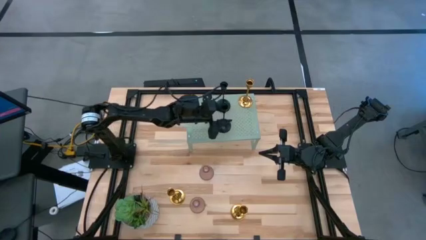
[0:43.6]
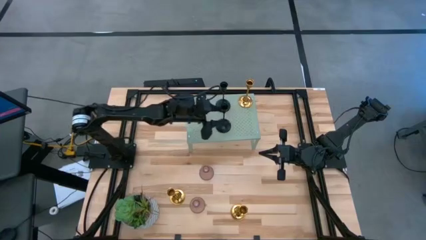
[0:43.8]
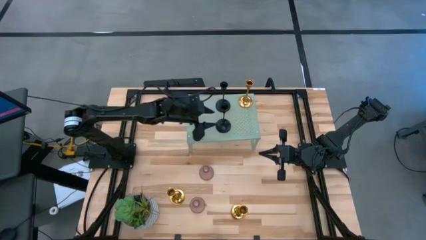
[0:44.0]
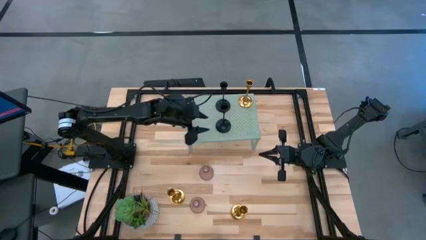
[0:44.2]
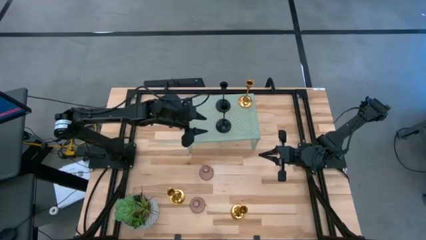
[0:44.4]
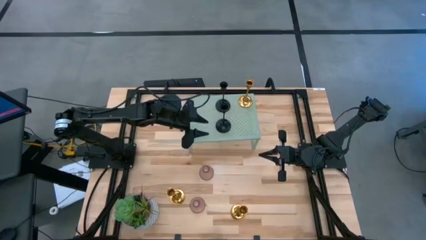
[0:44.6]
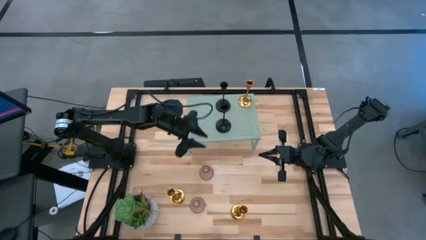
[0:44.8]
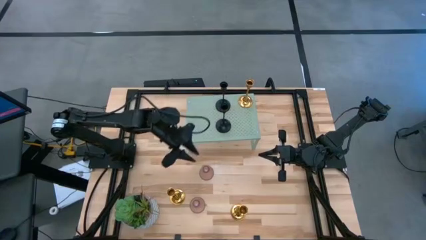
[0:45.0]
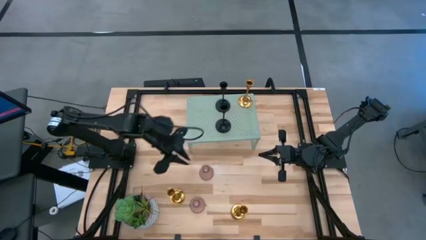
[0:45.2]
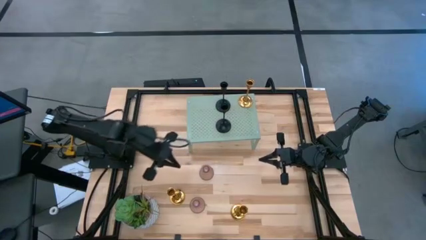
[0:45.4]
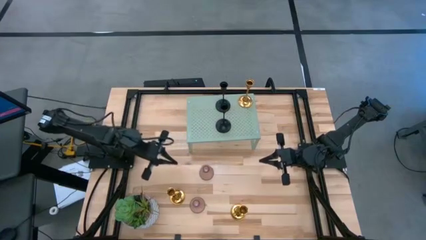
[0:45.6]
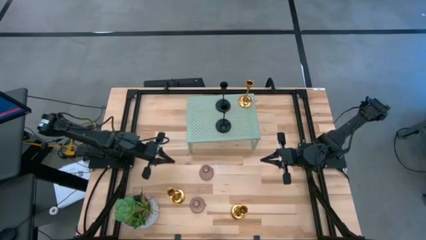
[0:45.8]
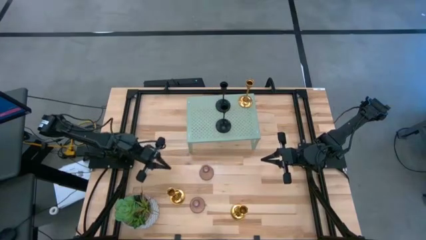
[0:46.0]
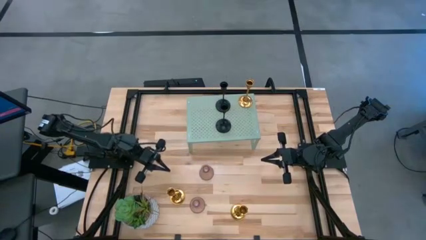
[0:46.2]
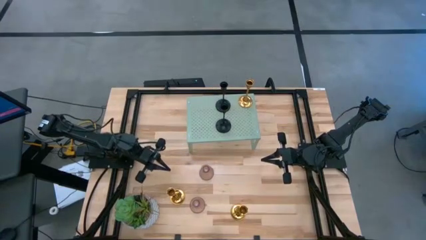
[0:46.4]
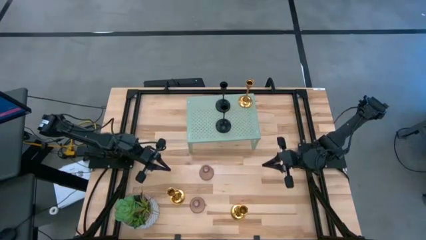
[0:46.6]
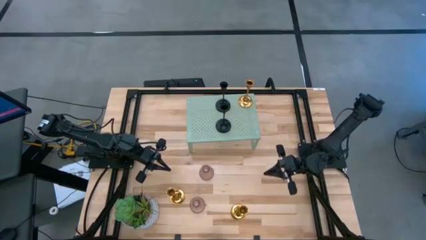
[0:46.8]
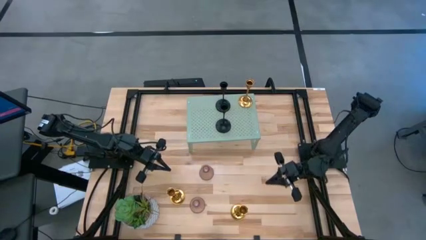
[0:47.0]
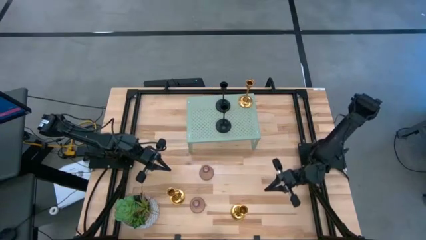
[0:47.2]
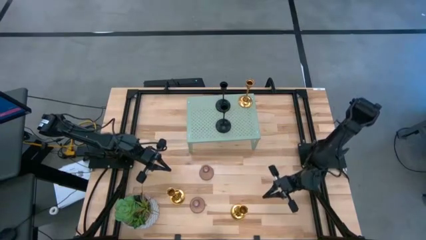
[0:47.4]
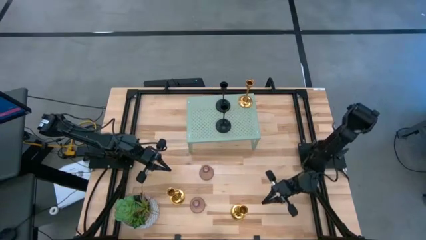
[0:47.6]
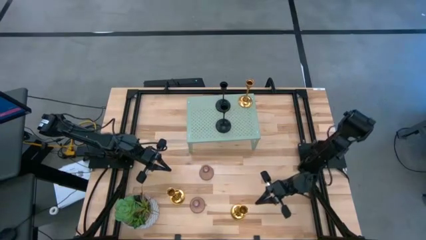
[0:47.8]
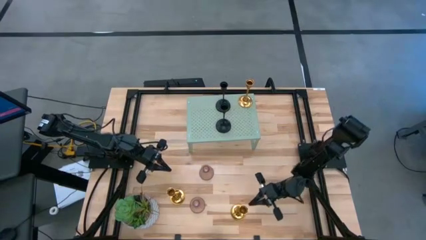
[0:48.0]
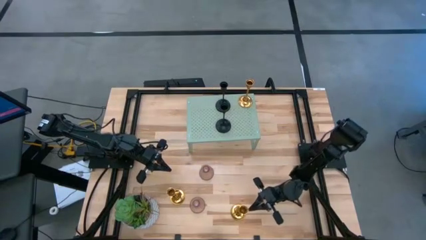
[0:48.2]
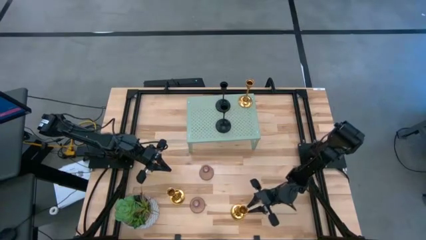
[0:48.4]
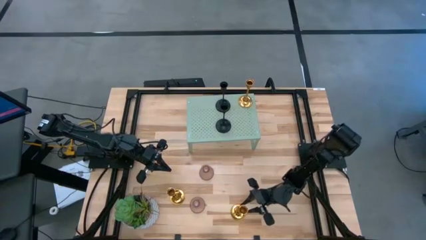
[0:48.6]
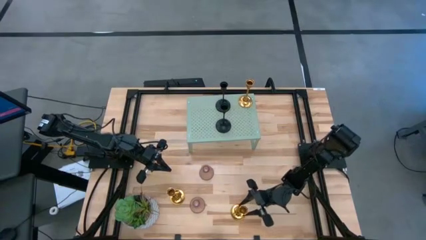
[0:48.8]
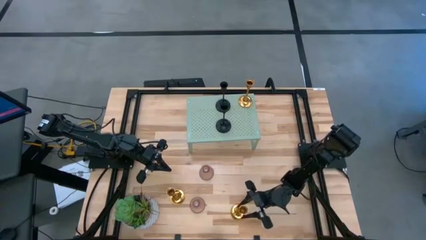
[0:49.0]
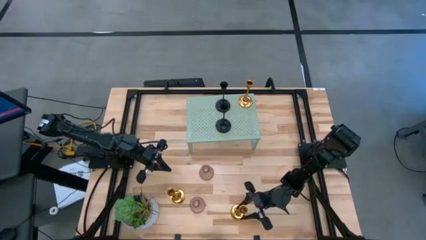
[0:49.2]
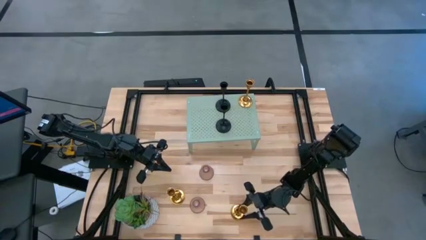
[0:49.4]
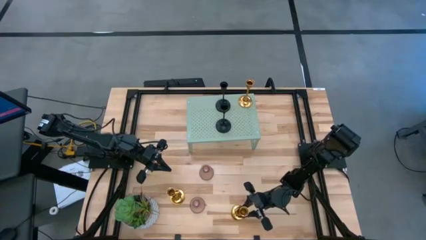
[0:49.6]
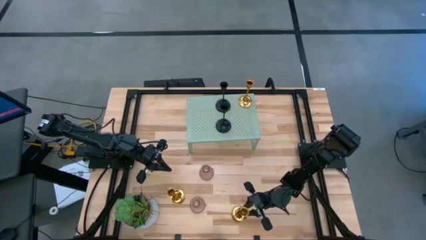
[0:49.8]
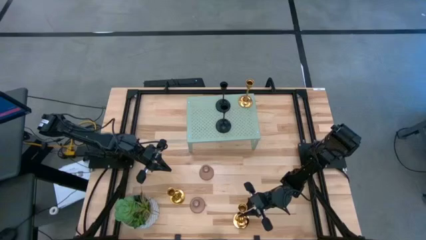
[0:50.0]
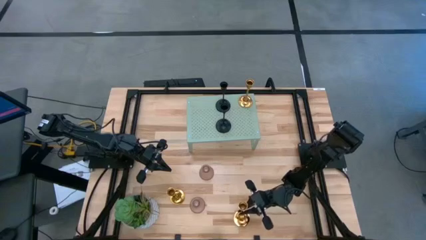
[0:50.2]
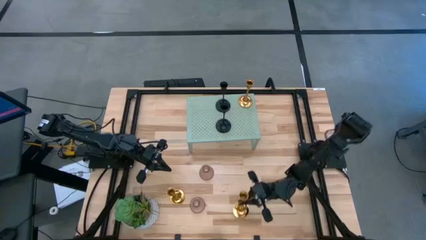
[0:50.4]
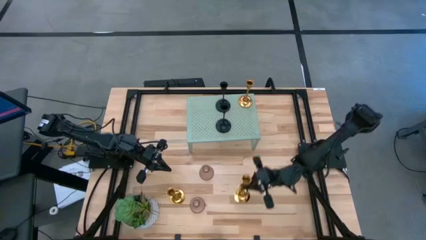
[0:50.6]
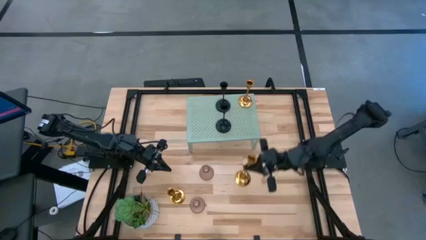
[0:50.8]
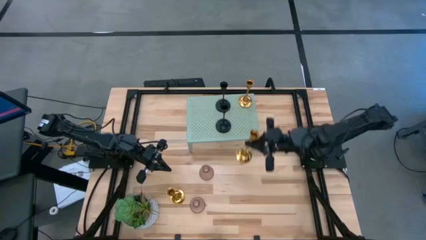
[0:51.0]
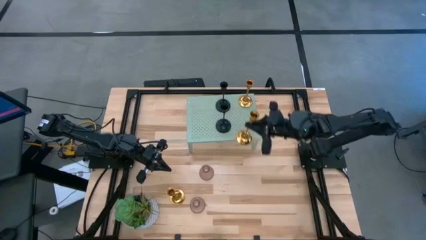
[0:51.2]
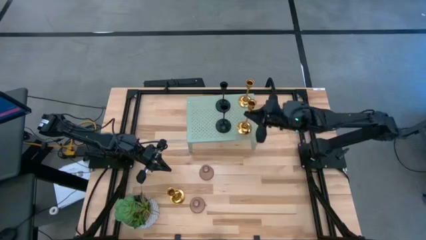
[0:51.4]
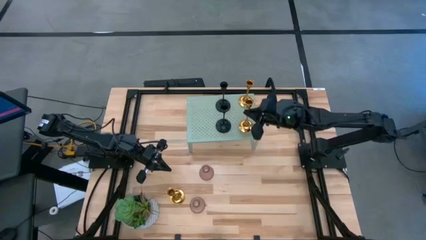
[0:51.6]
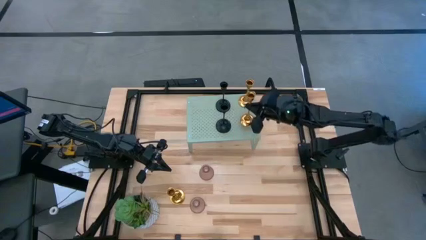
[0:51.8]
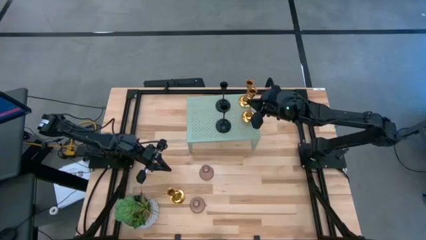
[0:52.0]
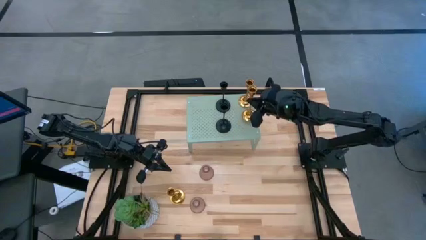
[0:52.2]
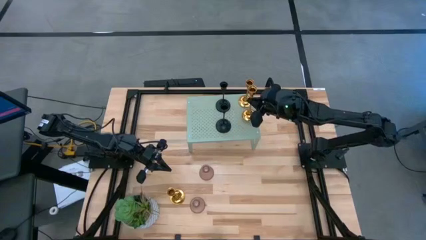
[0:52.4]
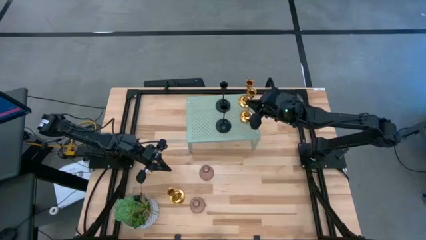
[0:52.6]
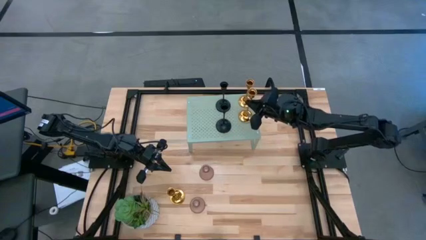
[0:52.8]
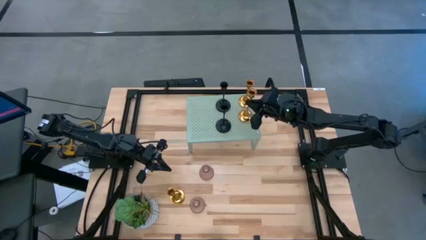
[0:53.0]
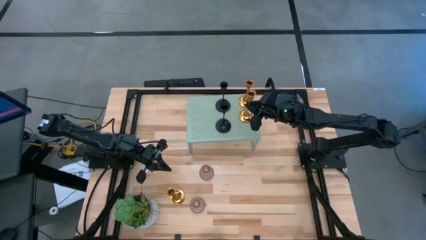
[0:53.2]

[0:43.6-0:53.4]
Task: Pick & Place candle stick holders
Put the bottom gold candle holder on the shelf aligned with the other gold candle holder

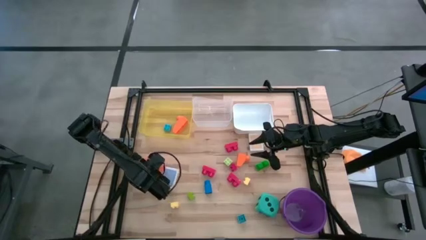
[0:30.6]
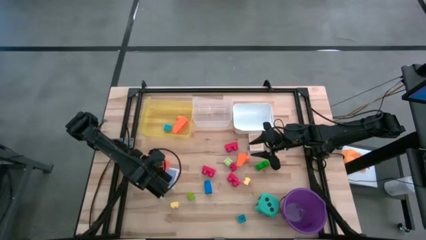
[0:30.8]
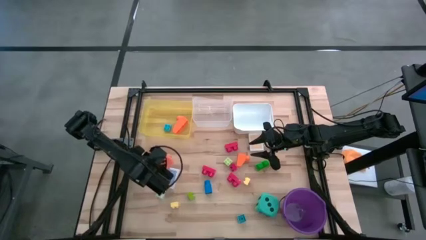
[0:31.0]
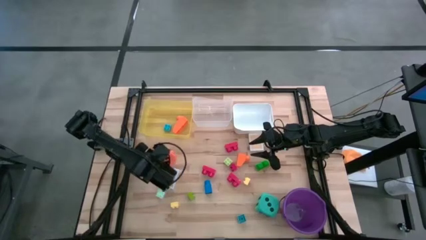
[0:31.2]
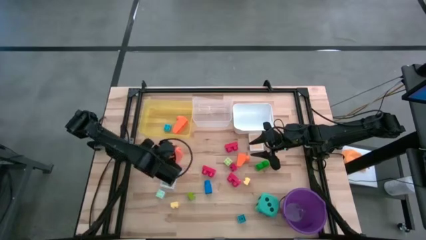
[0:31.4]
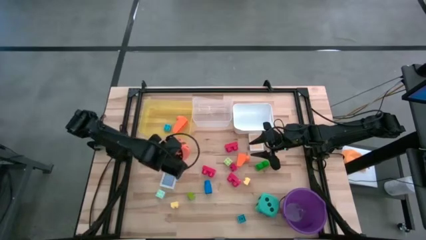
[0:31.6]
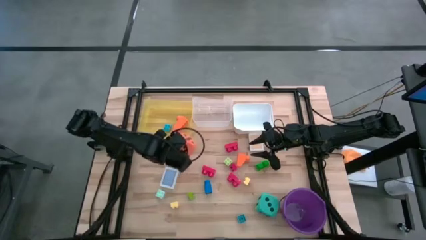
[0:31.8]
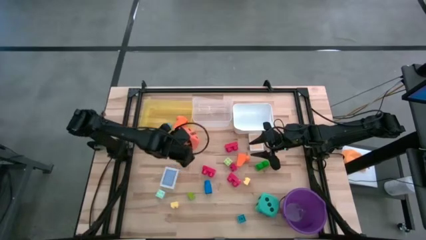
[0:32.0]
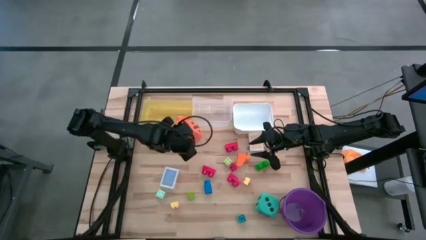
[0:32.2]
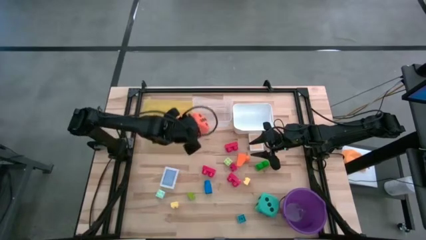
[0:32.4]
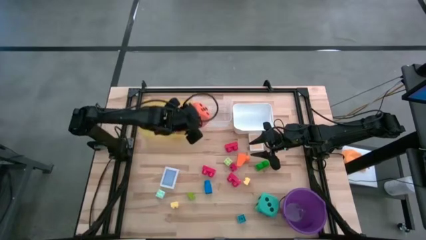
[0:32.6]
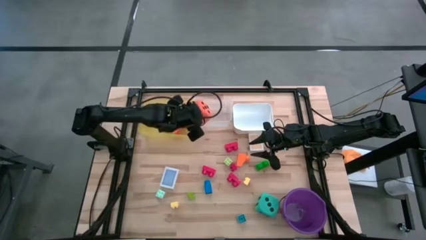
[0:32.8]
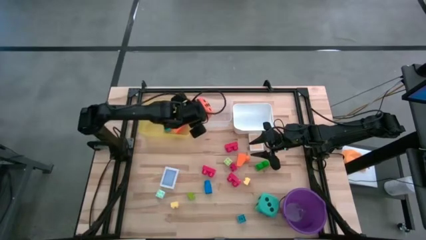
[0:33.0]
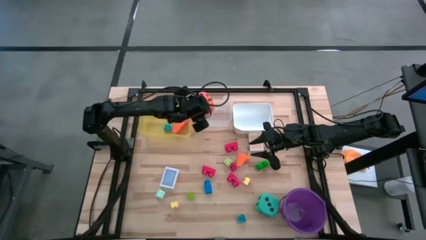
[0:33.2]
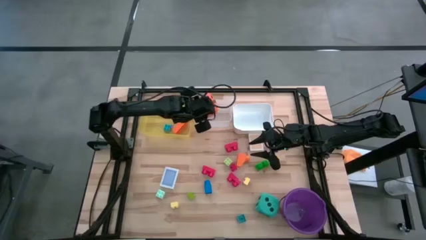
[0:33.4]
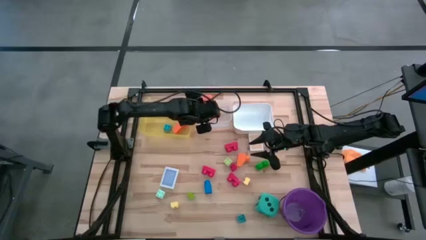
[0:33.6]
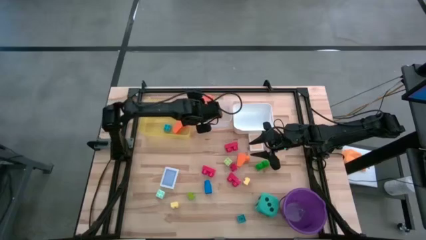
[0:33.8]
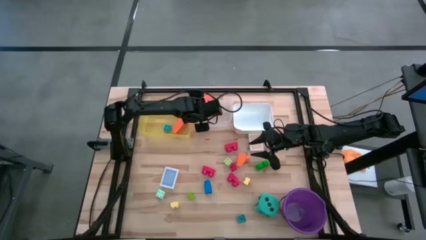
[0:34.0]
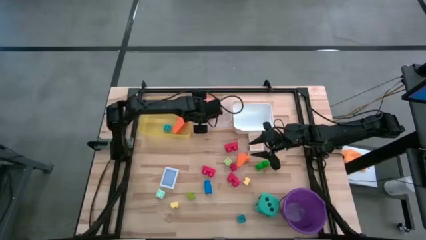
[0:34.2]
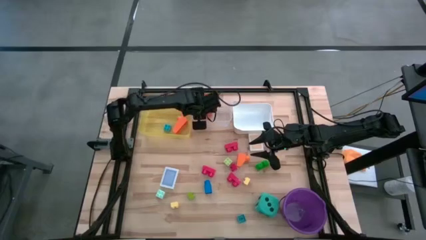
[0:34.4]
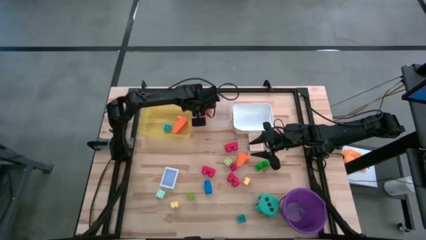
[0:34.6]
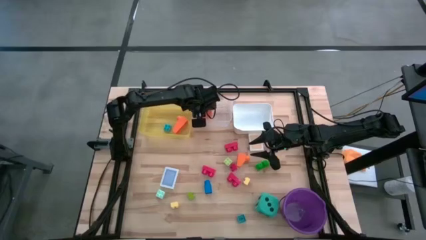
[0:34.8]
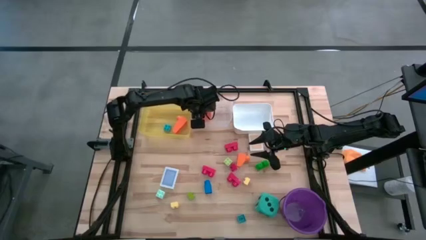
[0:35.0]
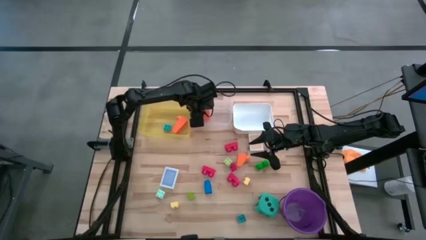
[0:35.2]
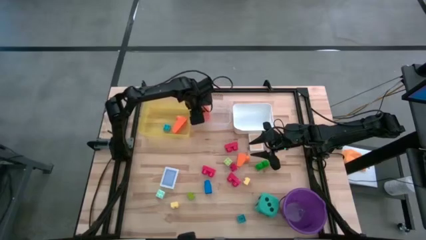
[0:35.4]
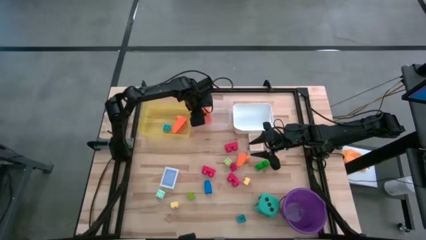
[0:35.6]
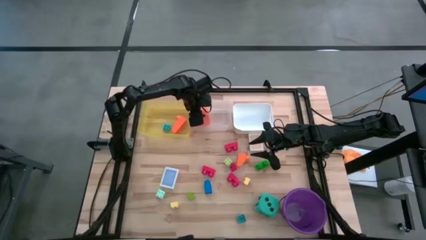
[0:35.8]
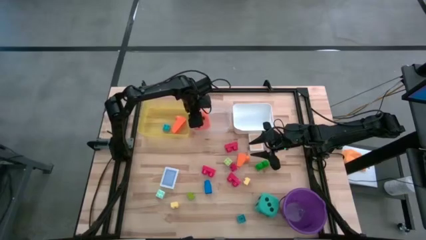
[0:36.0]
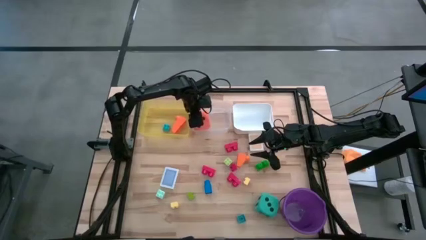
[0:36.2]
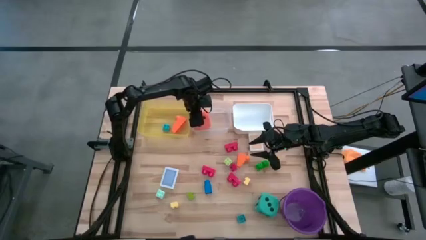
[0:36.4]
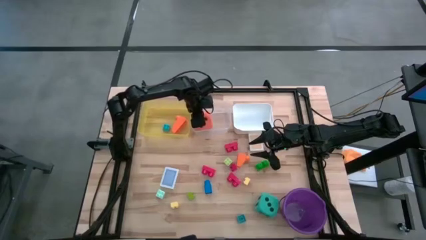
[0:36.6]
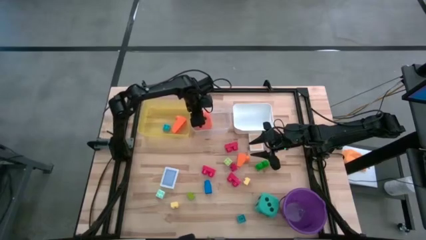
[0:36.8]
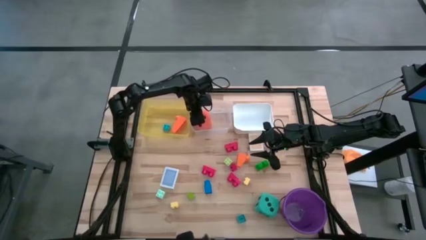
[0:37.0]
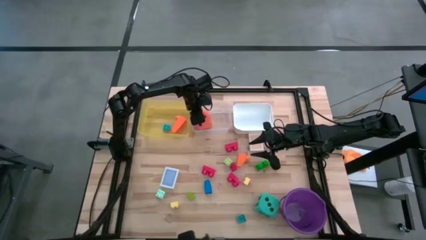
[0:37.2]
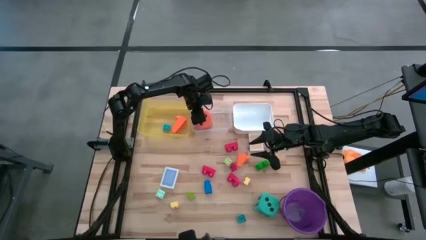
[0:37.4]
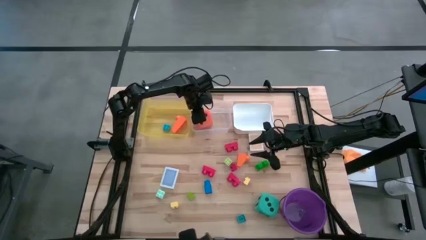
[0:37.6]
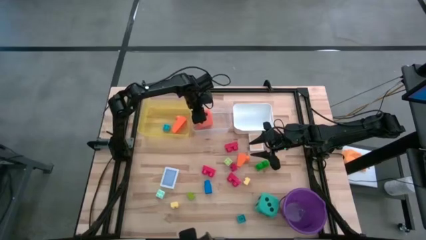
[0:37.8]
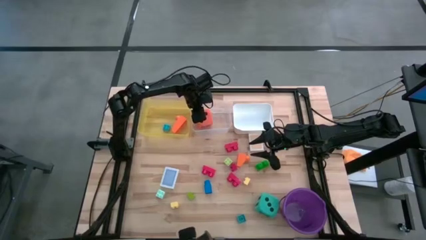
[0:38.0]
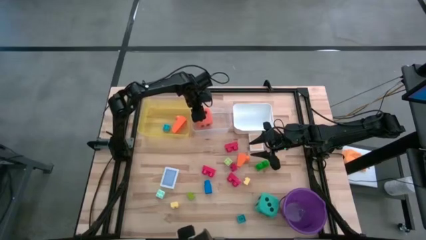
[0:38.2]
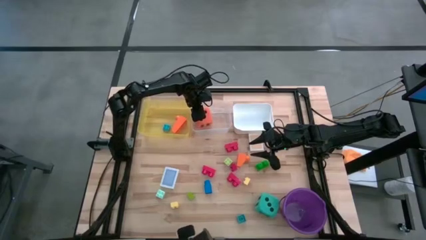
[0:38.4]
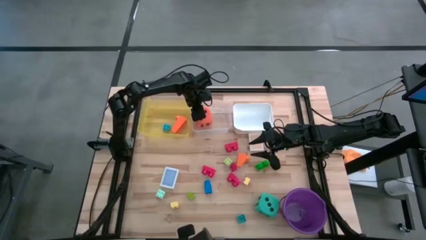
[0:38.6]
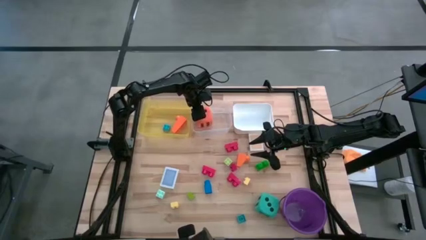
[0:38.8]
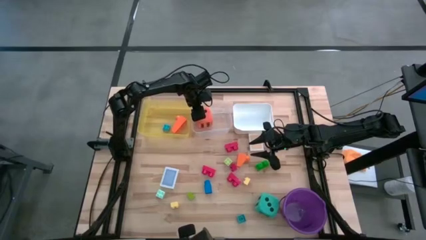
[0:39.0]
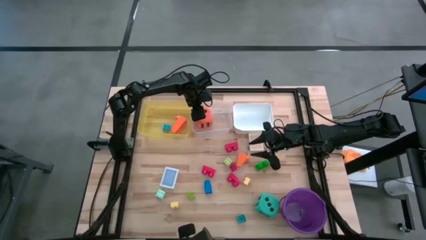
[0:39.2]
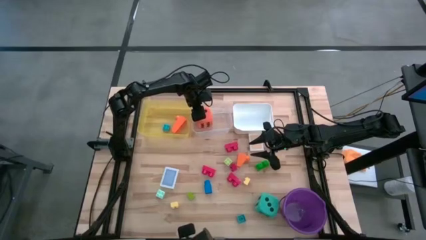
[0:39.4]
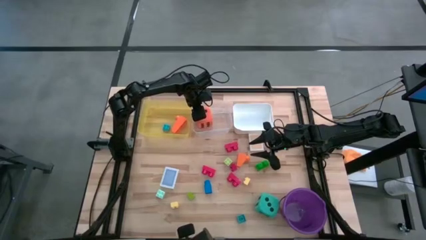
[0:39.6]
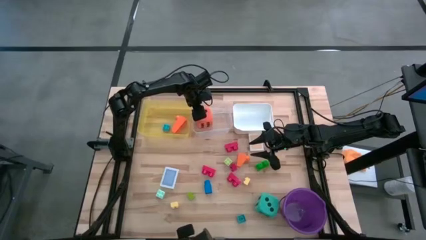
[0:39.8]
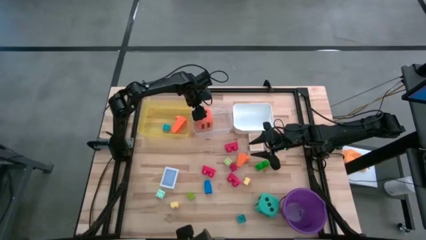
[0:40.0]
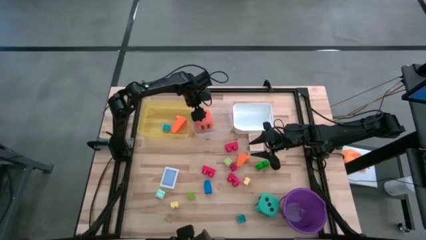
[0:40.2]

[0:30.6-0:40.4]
Task: Pick & Place Toys
Put the orange dice into the transparent bin
